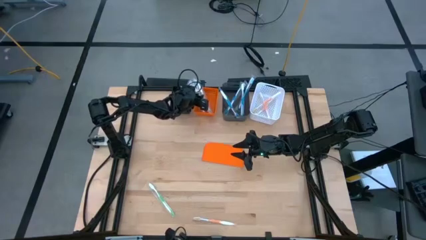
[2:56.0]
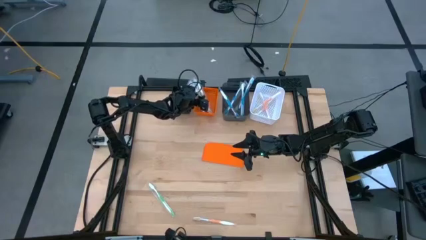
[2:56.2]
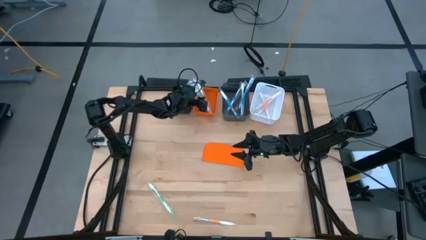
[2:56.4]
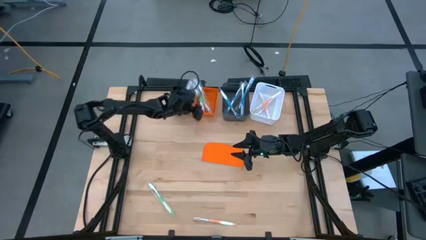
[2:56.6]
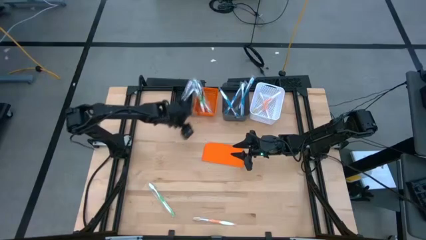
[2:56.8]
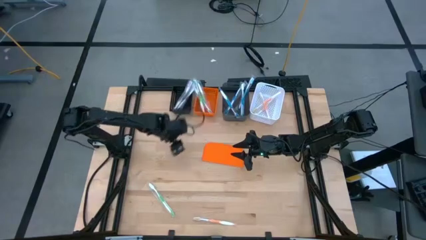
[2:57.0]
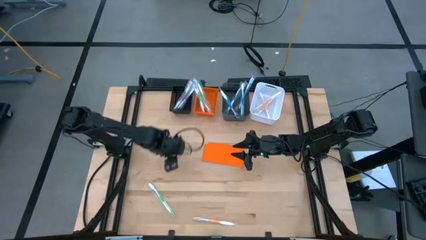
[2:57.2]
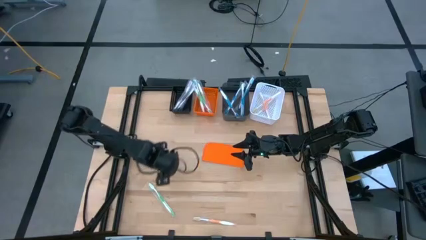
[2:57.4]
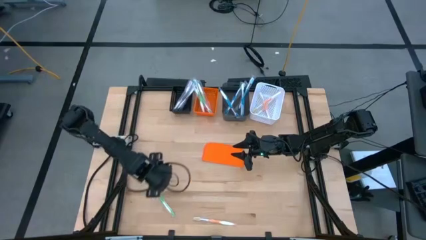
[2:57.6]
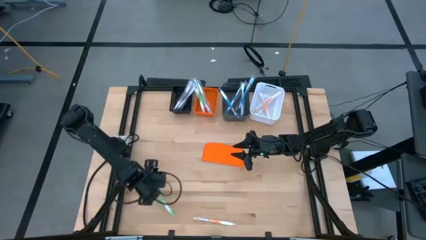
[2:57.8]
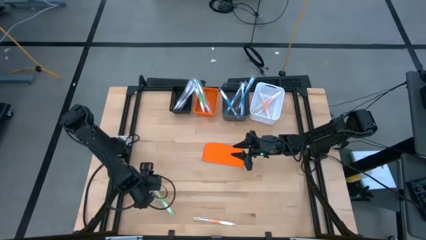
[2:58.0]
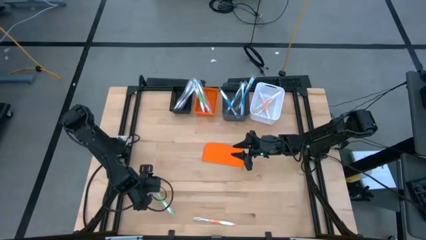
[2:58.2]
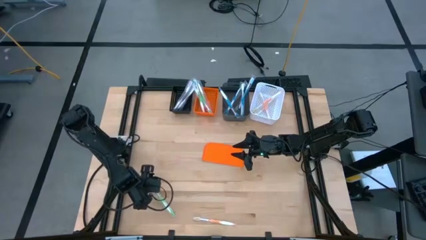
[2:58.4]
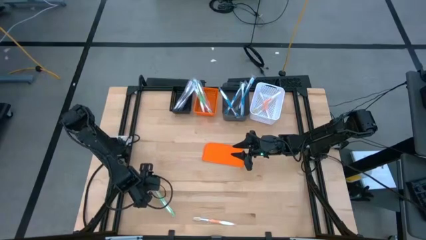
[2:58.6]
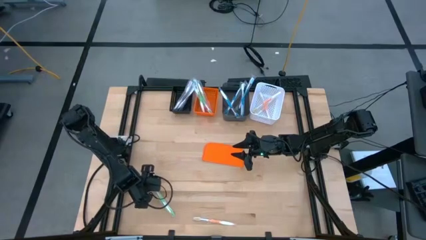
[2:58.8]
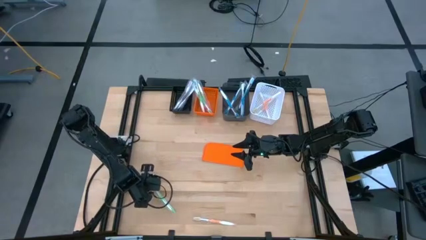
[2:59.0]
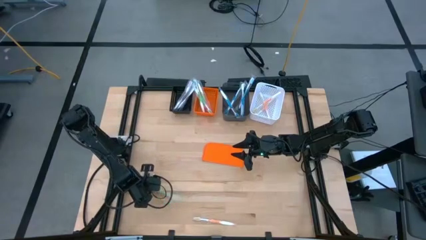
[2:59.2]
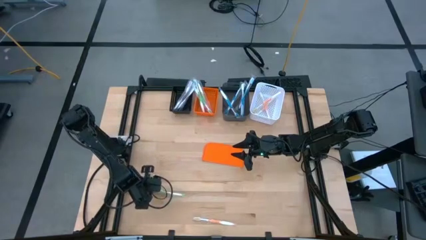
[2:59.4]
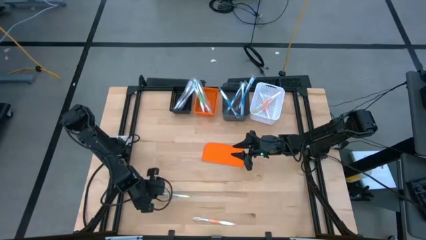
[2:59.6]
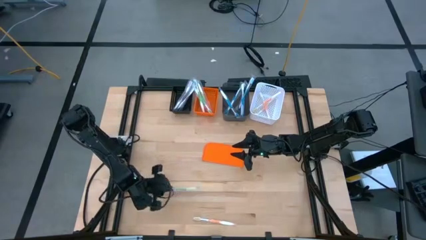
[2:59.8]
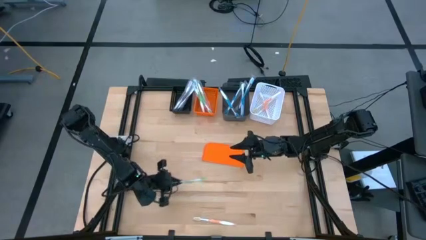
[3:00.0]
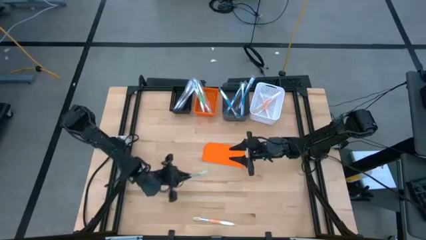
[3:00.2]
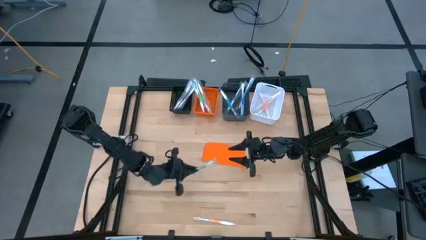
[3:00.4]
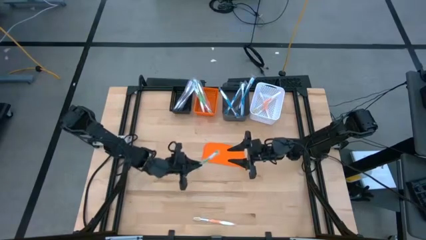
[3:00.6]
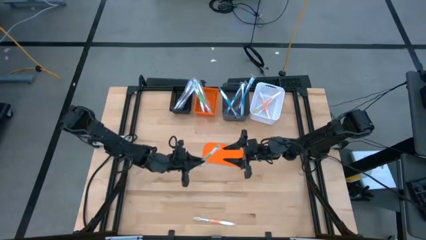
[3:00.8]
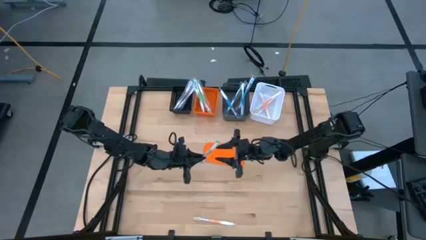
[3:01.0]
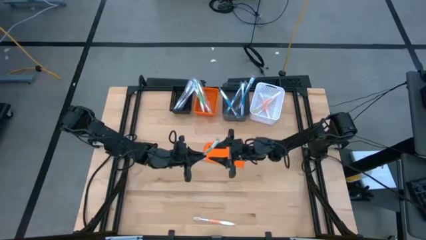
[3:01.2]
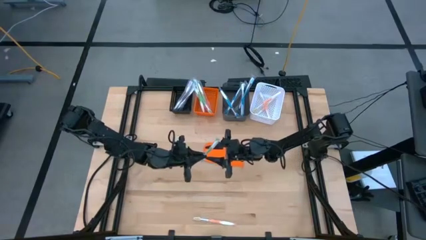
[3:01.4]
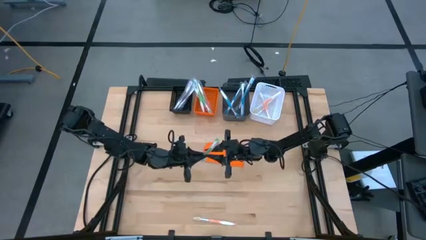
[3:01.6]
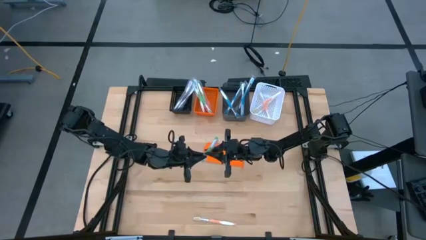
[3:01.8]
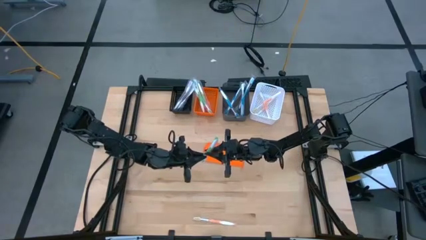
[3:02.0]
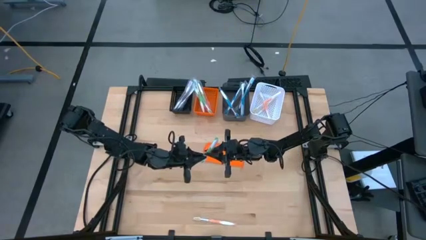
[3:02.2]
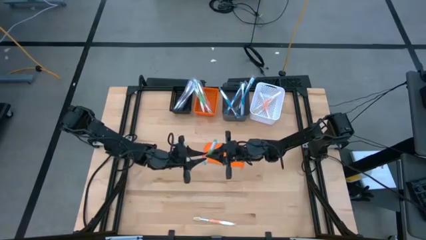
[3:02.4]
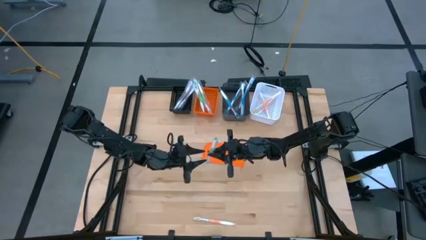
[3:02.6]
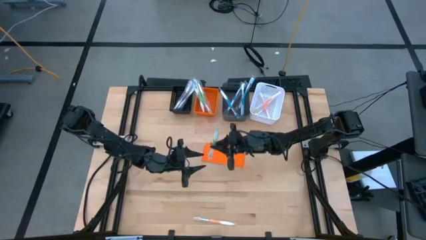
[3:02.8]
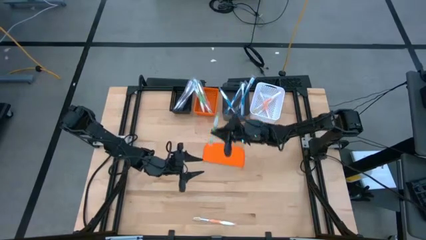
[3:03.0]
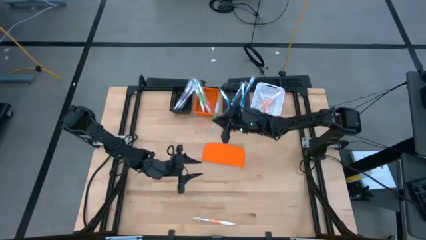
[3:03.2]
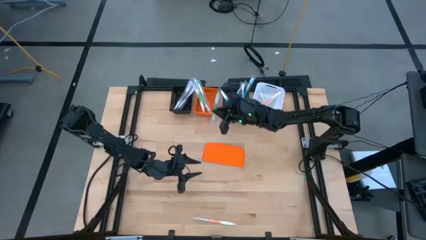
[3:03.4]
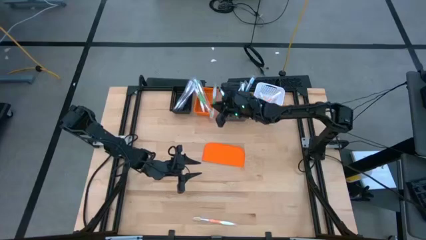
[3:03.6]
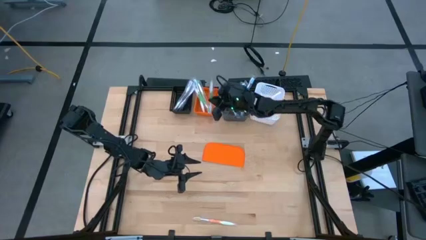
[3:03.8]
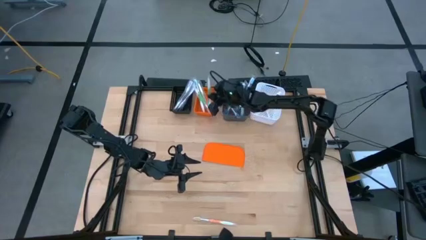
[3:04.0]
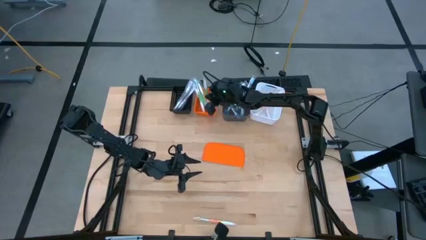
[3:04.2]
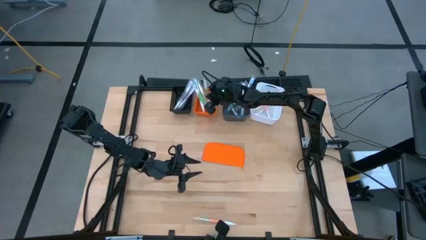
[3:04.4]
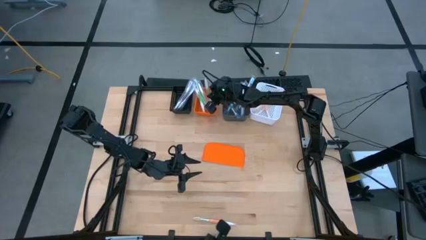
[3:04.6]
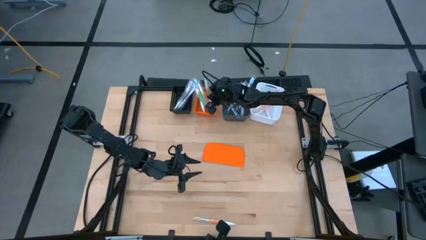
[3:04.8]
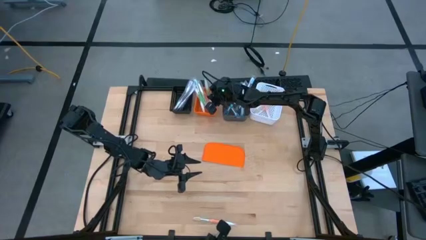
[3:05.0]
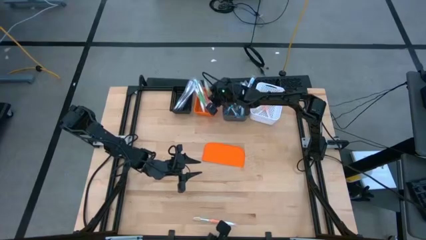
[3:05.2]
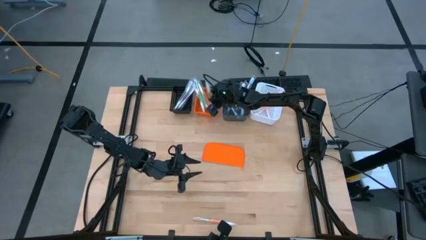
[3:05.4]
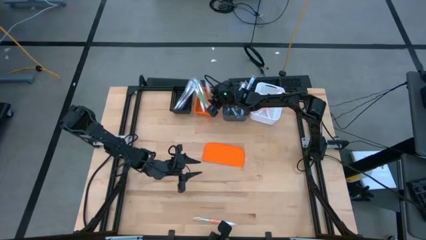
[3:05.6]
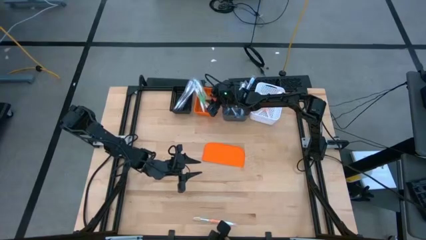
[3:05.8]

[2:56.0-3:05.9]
Task: Pick & Place Toothbrushes
Put the green toothbrush into the orange bin

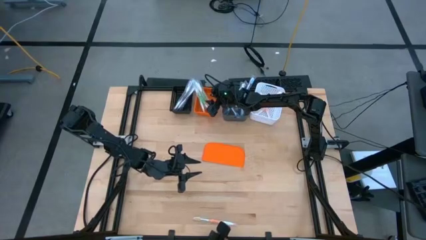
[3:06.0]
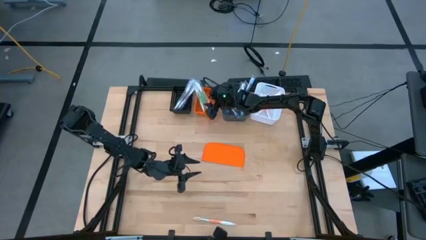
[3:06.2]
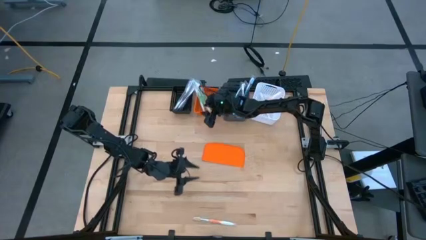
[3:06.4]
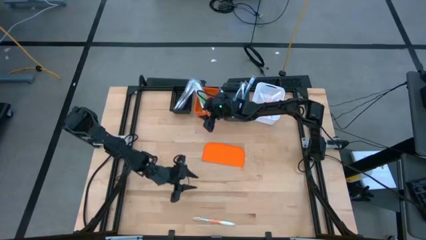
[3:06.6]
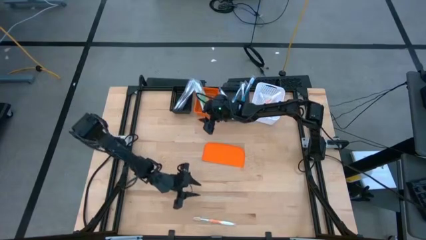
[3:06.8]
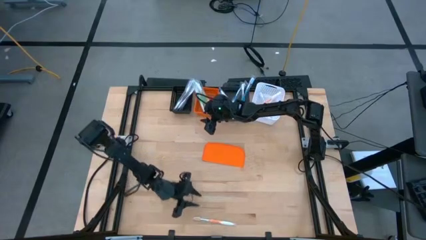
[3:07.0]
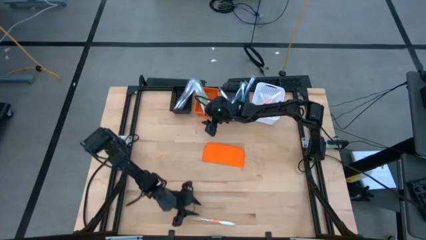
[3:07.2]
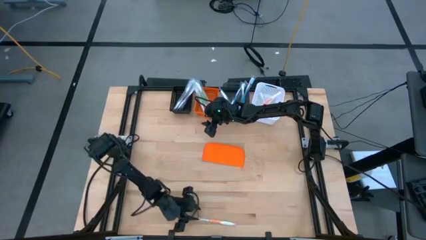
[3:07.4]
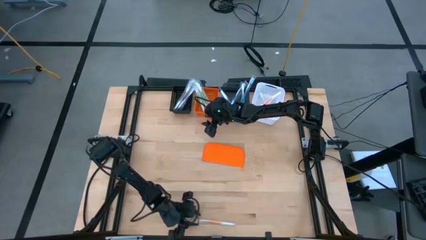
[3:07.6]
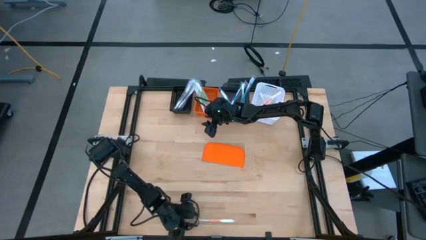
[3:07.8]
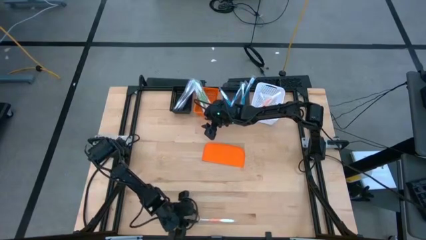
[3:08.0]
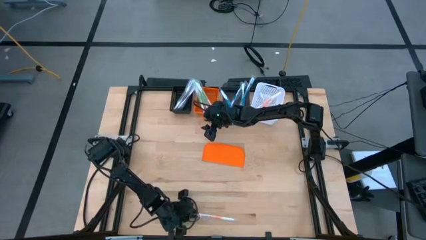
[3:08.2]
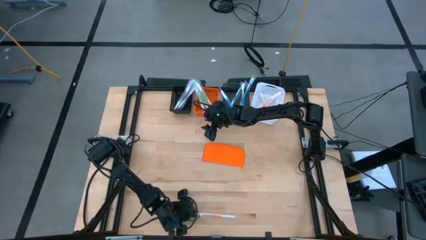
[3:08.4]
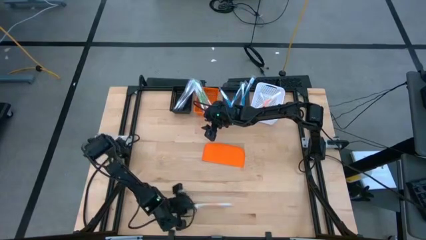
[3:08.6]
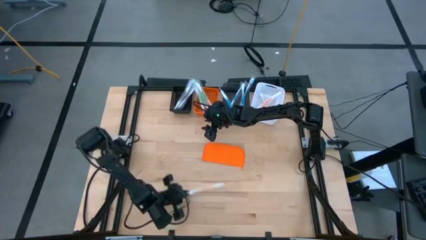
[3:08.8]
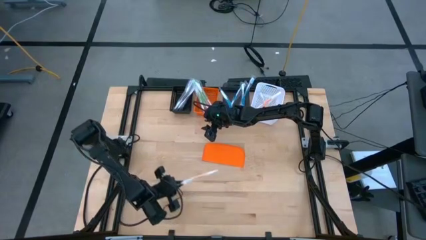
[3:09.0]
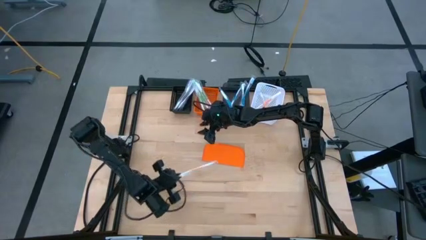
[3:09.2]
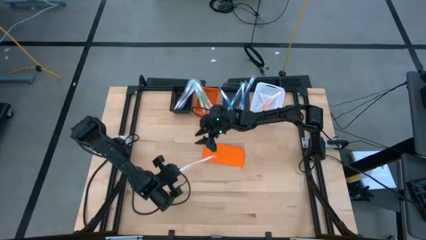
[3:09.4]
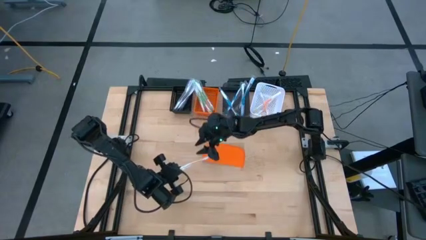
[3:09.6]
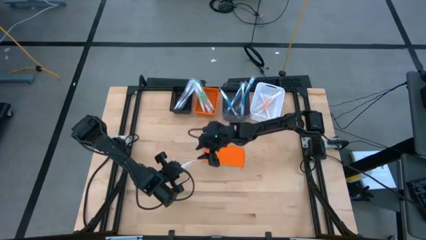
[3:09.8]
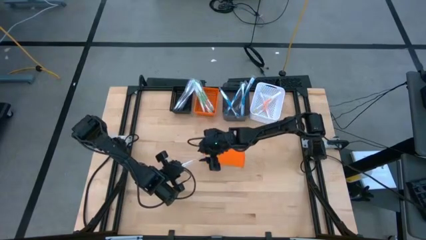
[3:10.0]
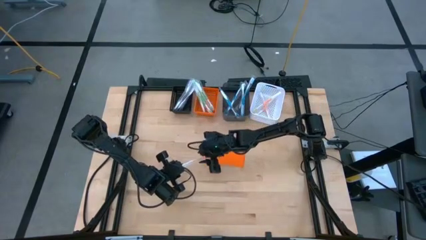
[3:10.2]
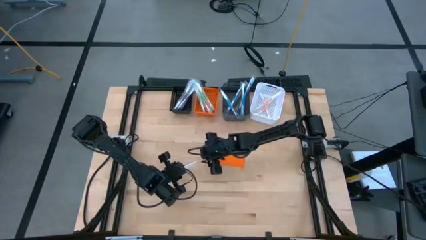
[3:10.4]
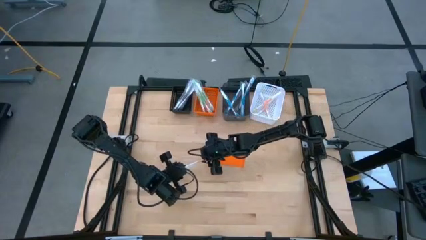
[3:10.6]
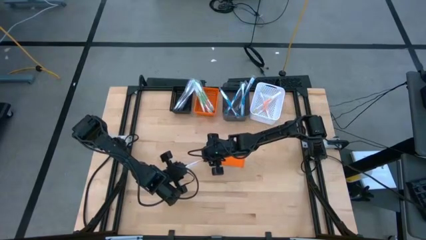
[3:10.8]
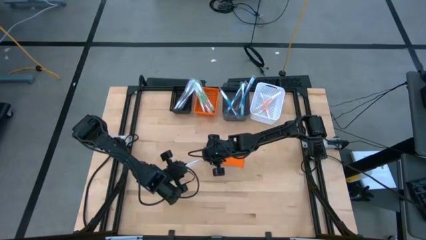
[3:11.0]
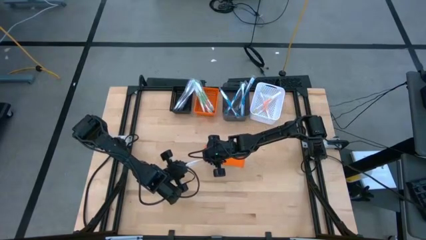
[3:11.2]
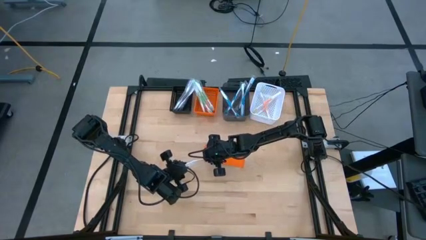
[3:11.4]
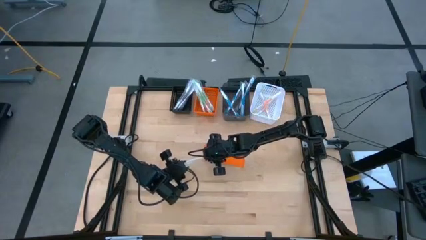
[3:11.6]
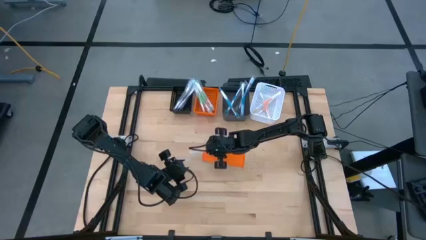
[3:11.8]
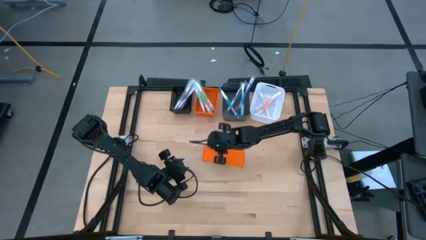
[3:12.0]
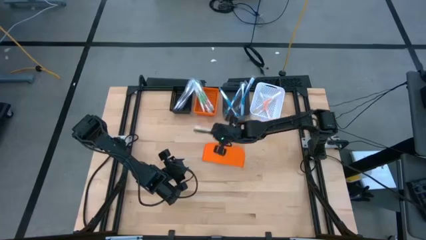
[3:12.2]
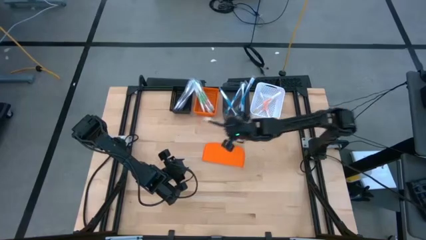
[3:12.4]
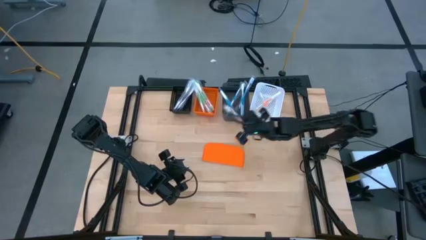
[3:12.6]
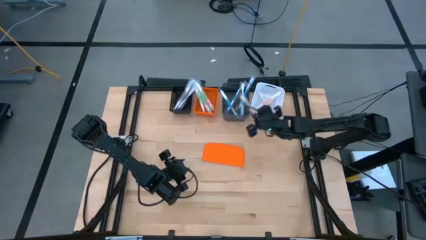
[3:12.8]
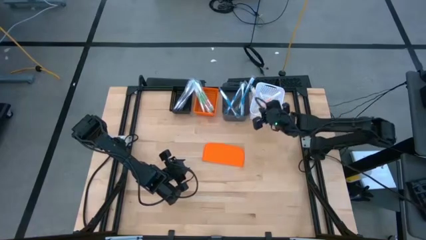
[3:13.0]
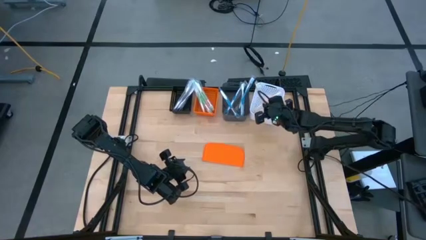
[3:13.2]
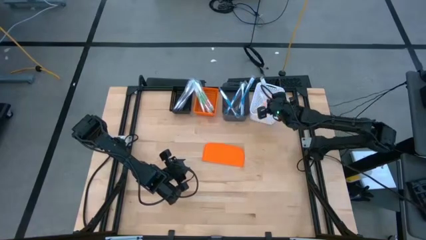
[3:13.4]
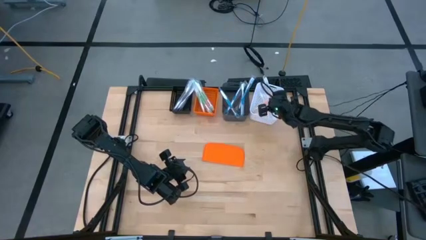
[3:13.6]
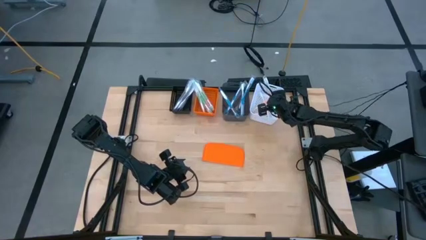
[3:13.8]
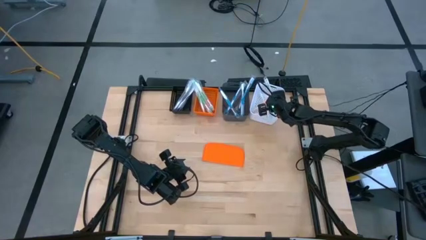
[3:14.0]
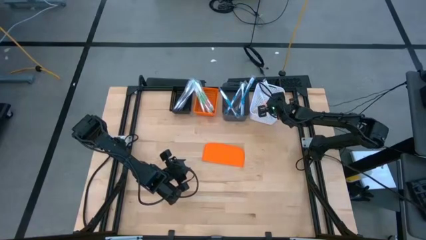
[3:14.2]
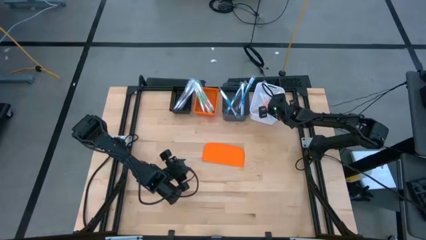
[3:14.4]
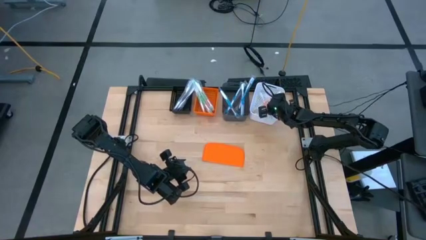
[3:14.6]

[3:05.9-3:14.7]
Put the orange toothbrush into the white bin
